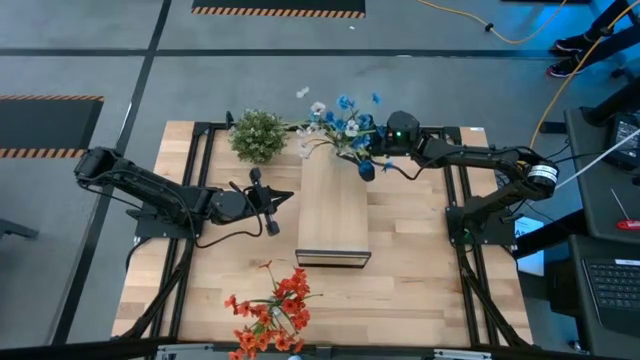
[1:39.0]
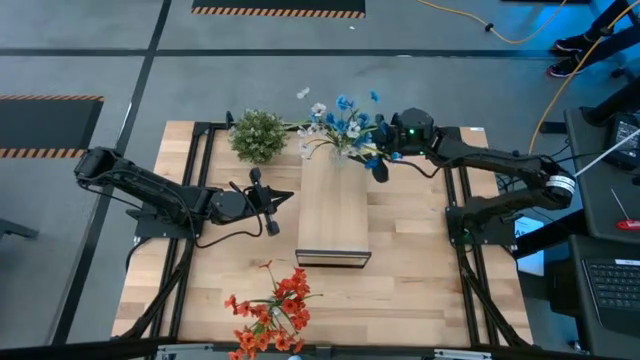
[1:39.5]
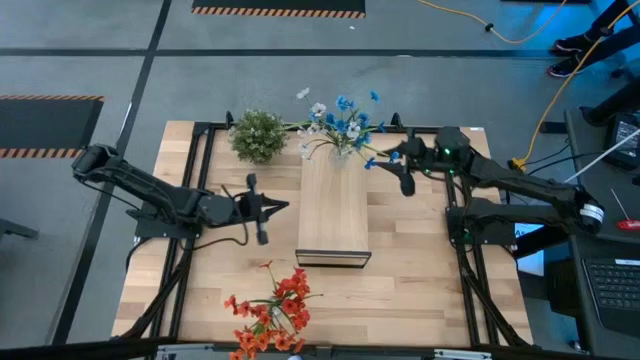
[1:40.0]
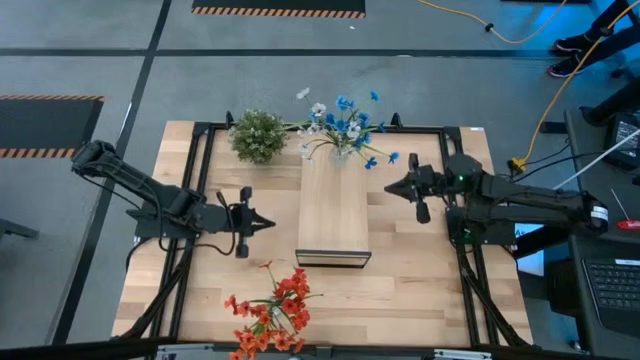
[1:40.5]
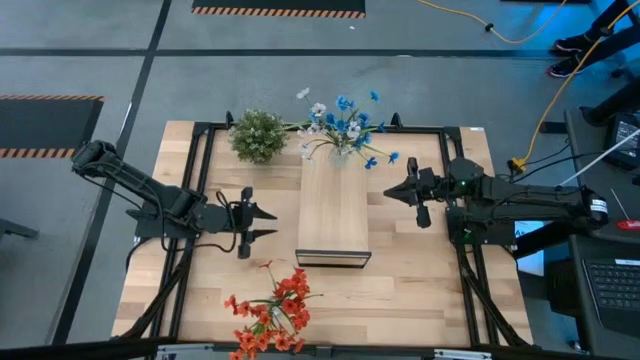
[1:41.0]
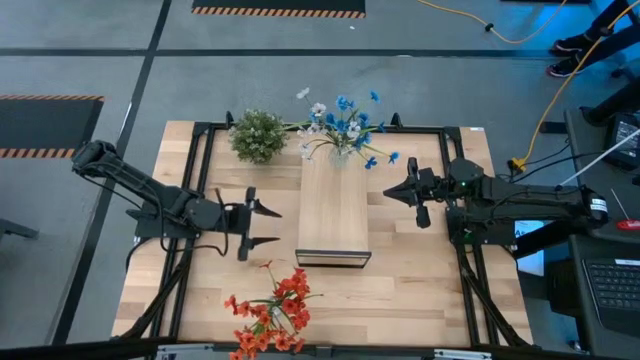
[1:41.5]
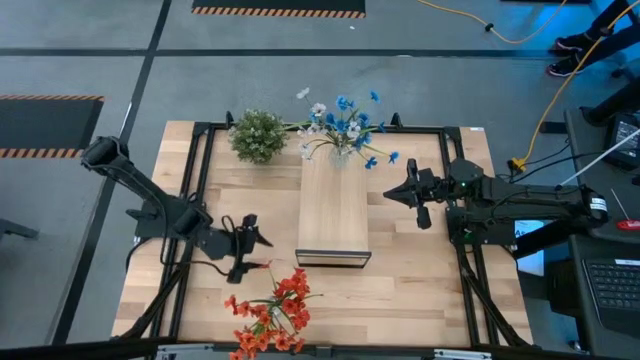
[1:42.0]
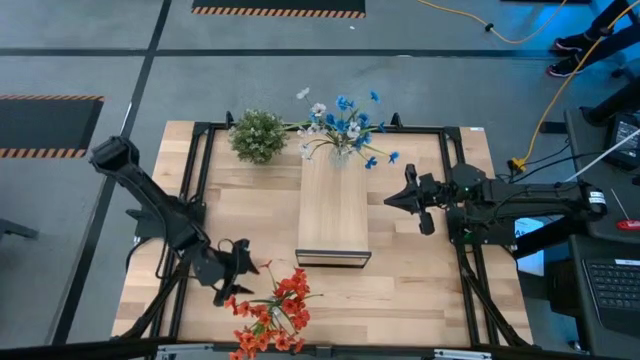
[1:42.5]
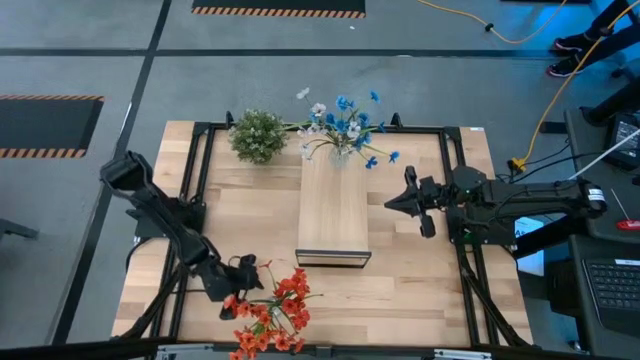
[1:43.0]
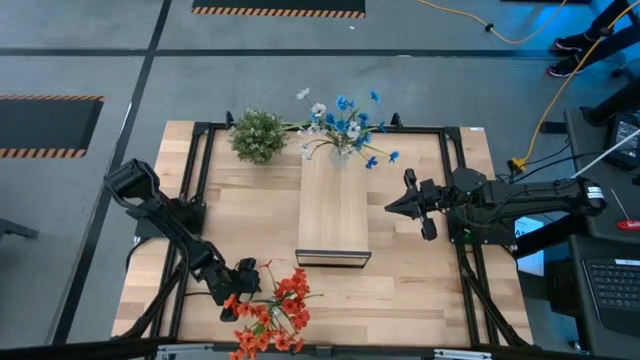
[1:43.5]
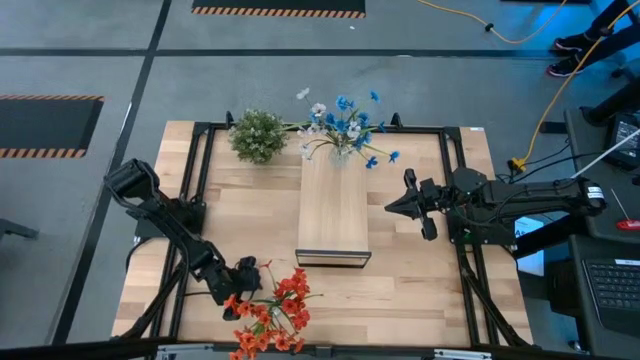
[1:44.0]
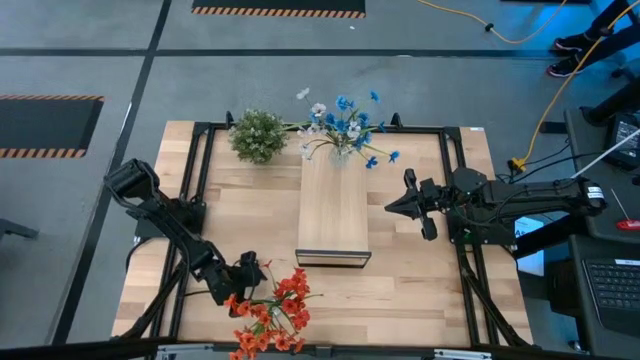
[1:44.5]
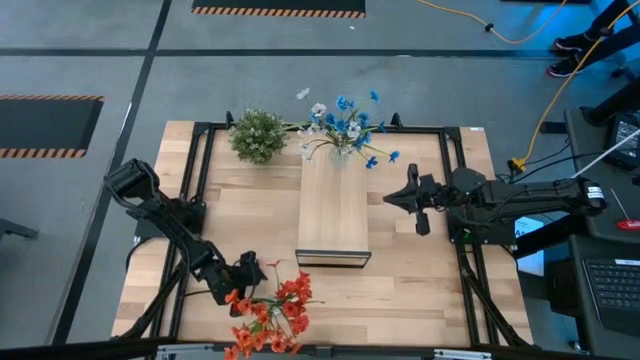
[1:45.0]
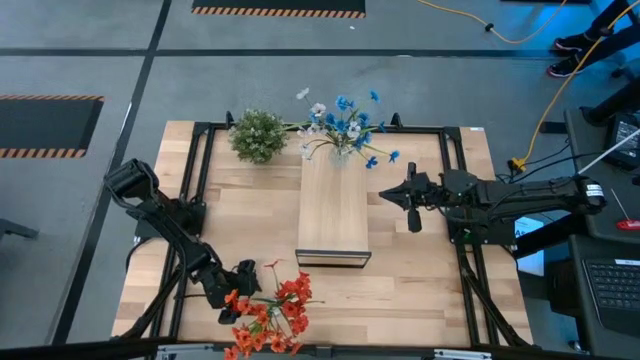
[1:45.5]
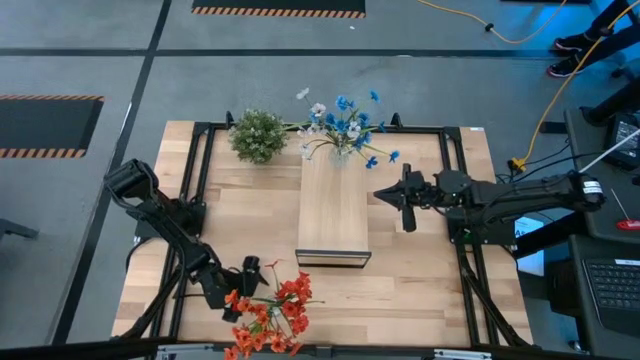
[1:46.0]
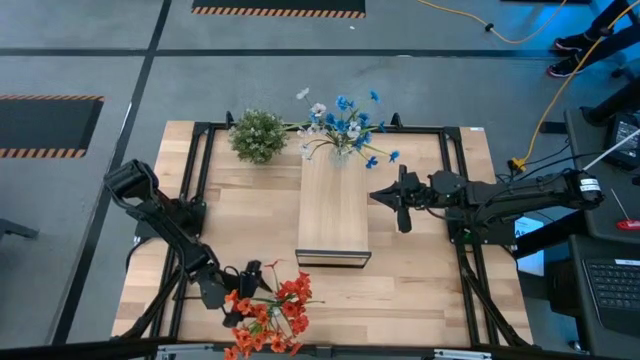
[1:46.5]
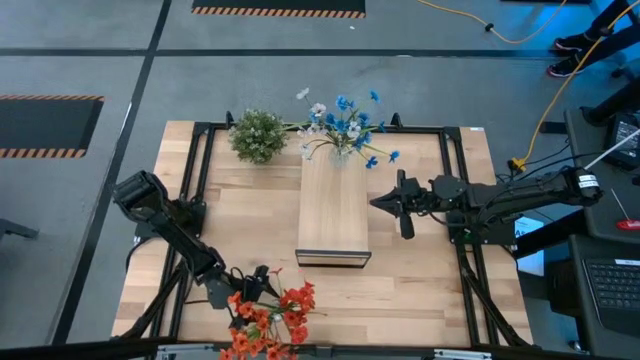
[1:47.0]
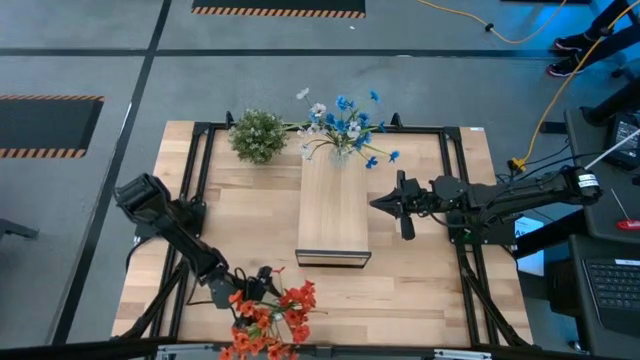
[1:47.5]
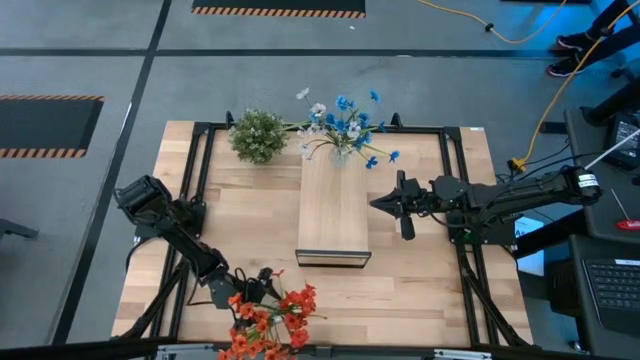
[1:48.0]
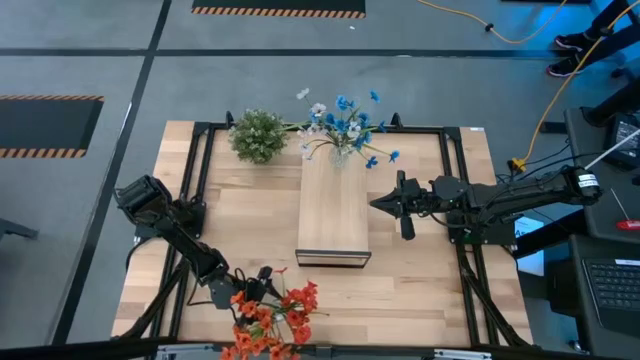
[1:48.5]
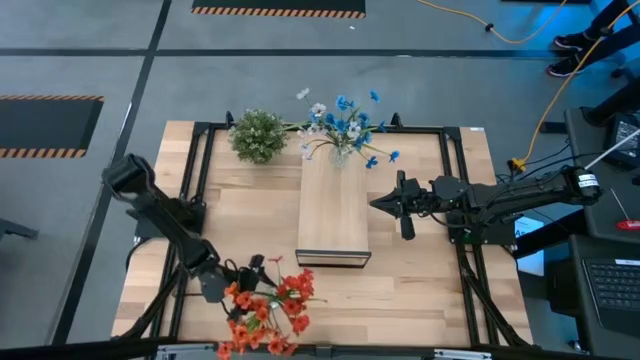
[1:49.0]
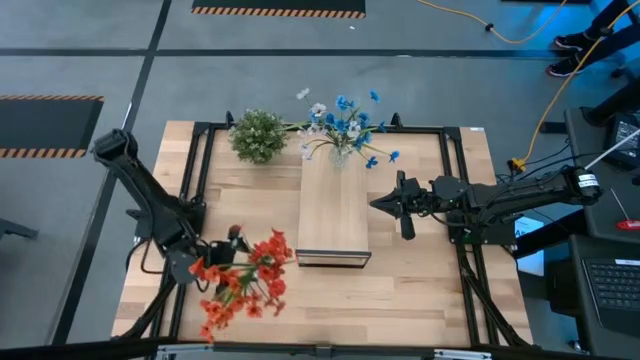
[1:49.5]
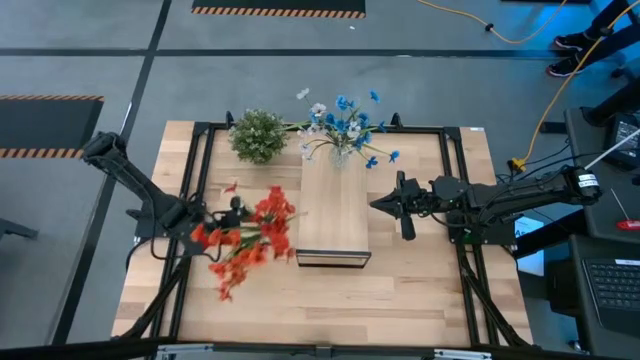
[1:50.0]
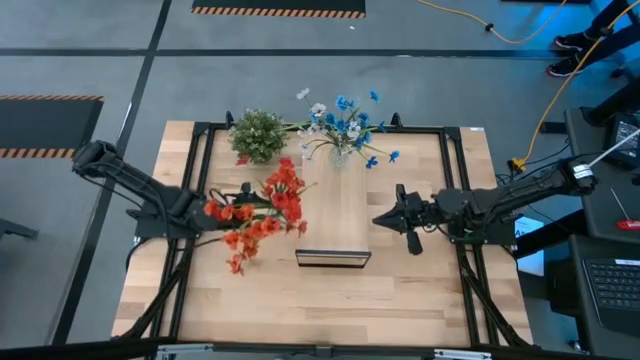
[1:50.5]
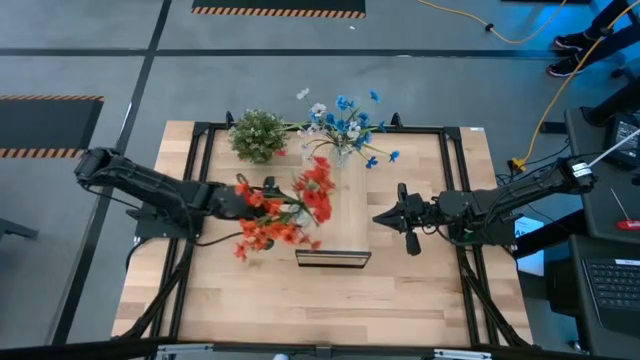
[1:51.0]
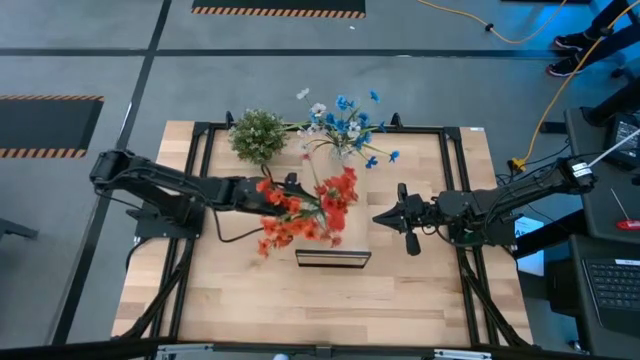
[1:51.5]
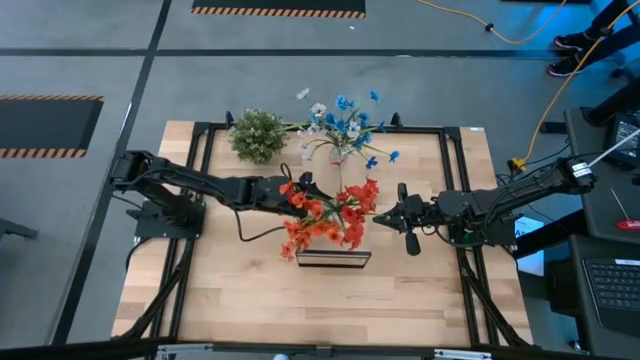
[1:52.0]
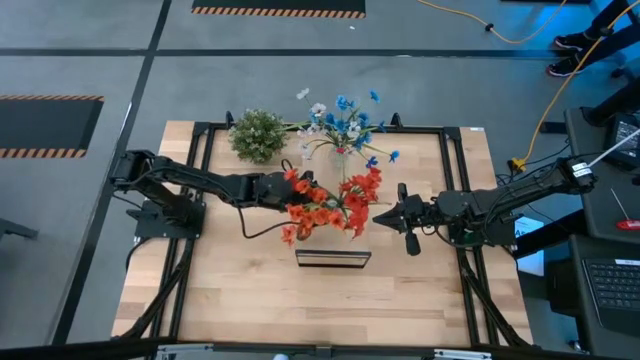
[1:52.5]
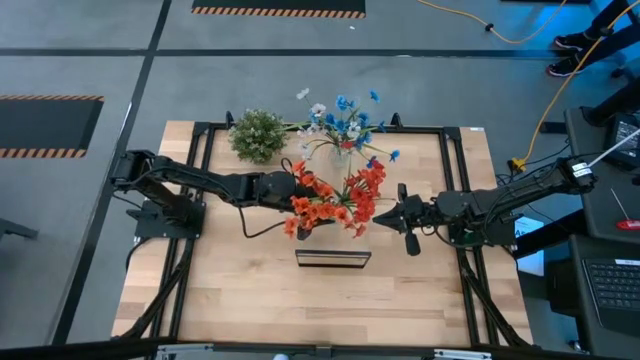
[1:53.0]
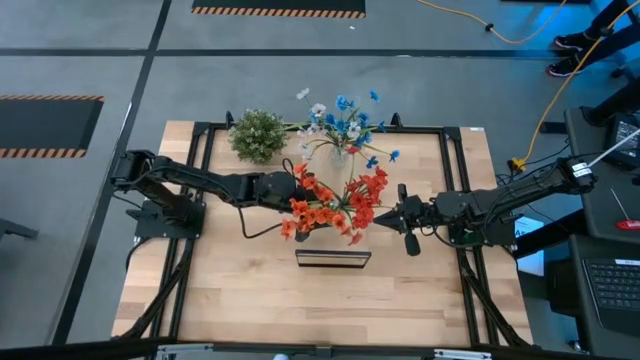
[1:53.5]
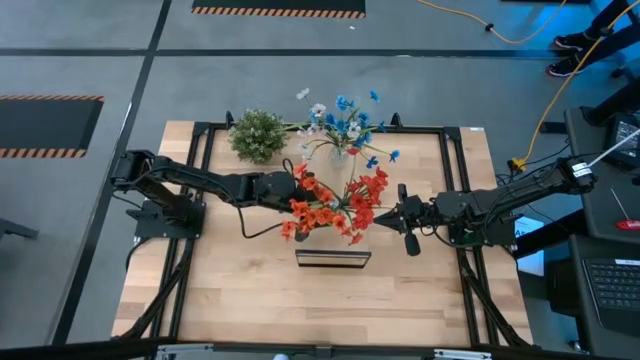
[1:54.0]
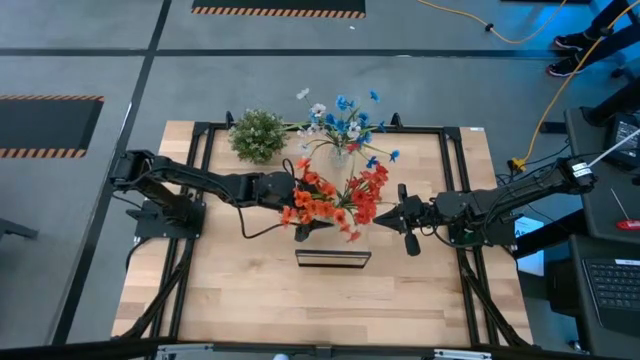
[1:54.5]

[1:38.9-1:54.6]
Task: Pick and place flowers into a vace then onto a shelf
Put the transparent flower vase with flowers on the shelf

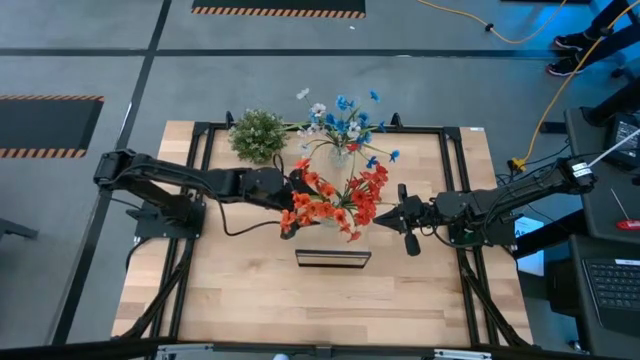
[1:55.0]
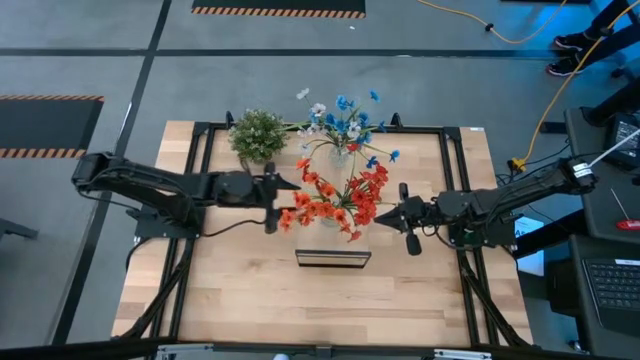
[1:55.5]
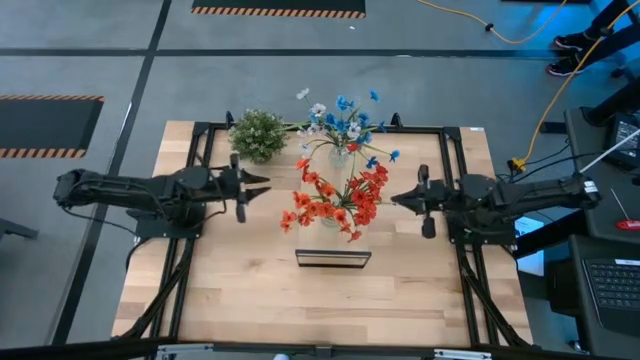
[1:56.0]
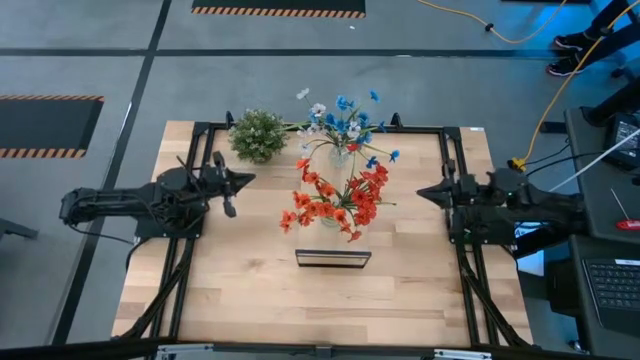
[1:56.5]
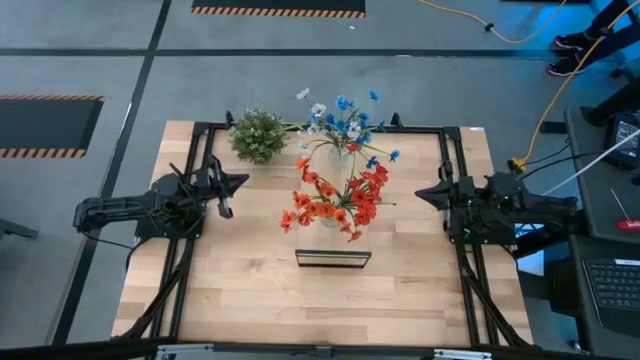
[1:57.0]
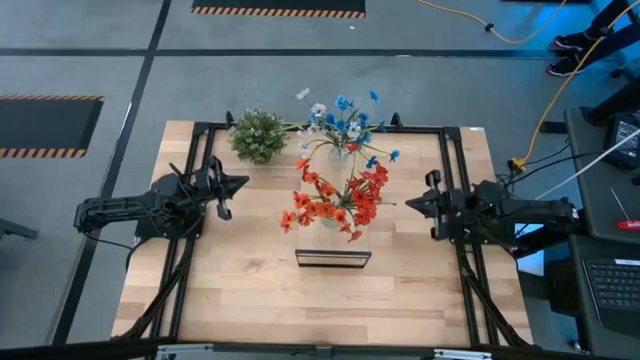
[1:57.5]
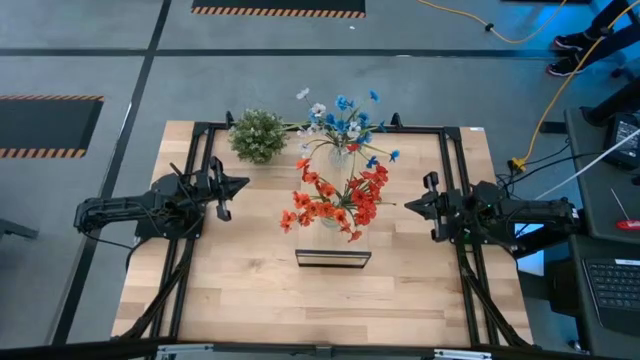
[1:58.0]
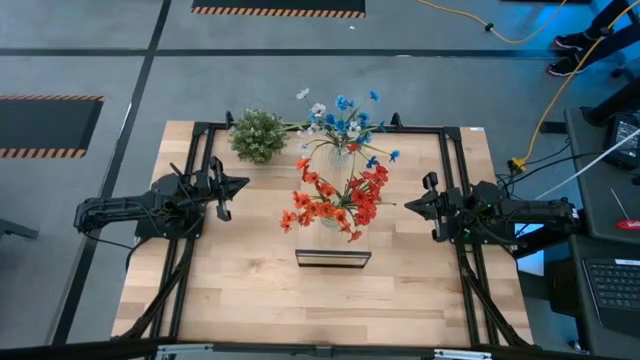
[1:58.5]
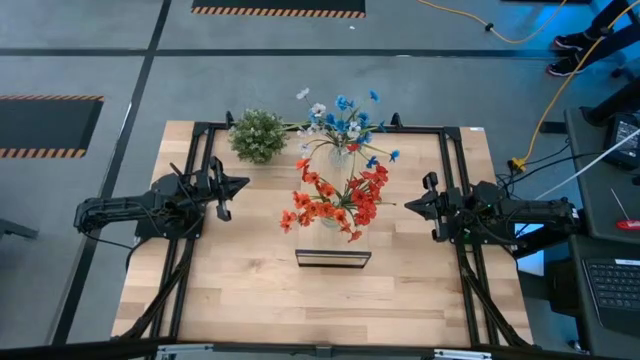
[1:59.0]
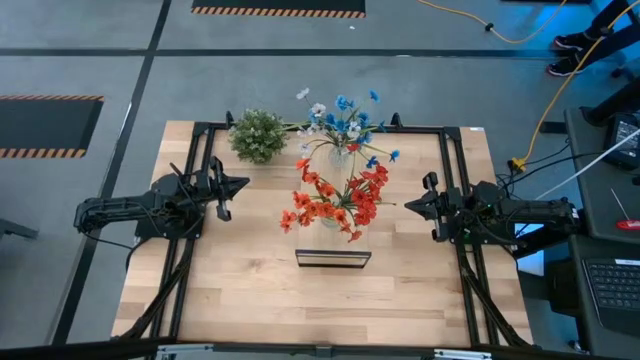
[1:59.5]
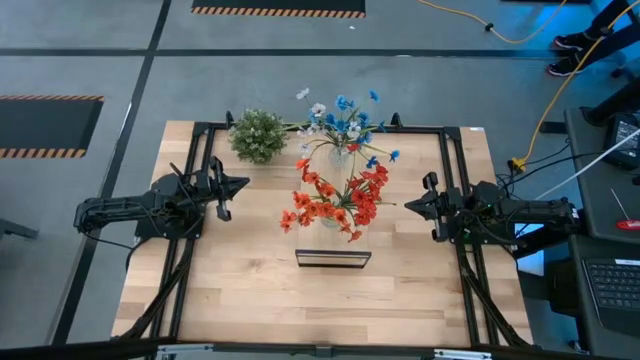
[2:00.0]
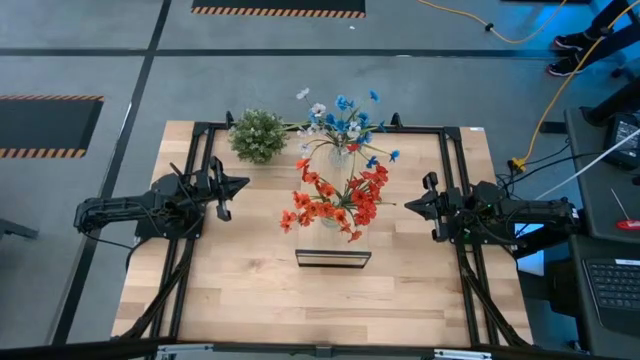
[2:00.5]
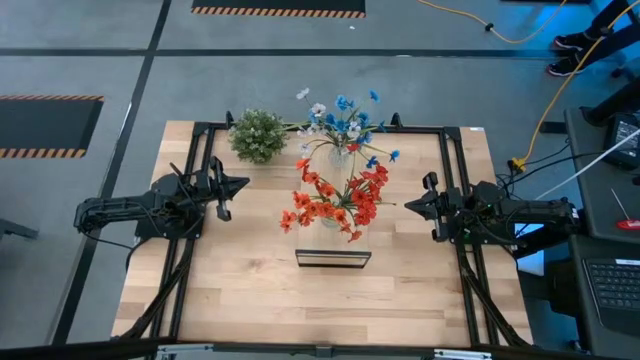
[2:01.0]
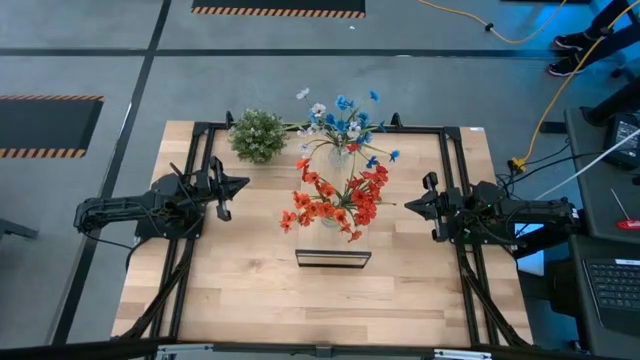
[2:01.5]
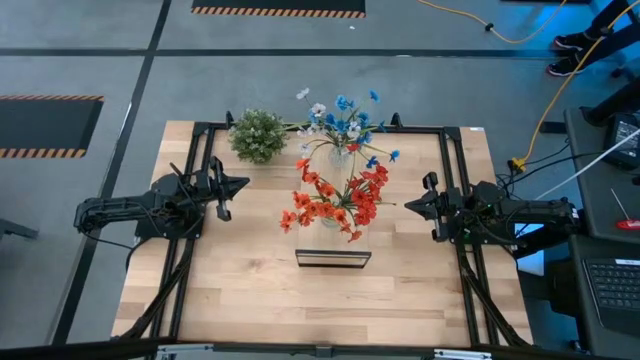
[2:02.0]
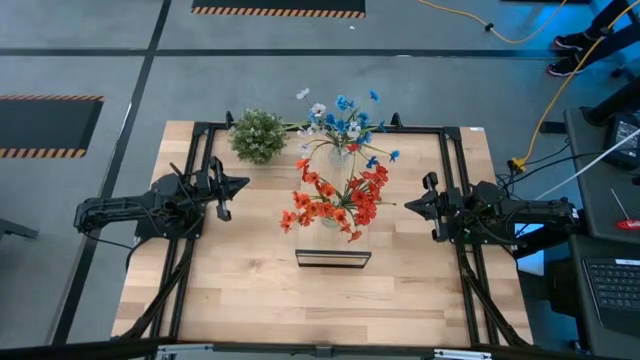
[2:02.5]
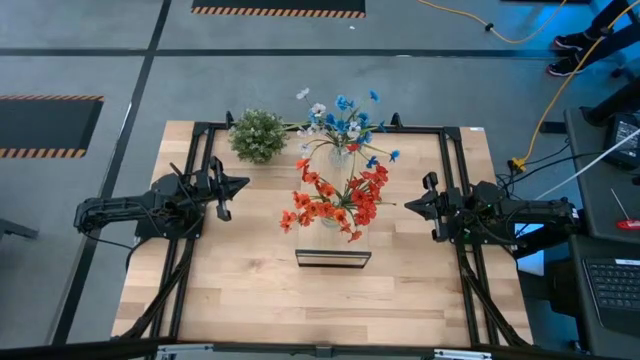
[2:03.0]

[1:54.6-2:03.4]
Return to Home Position
